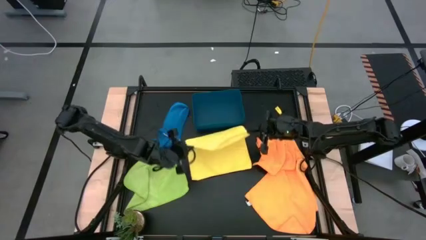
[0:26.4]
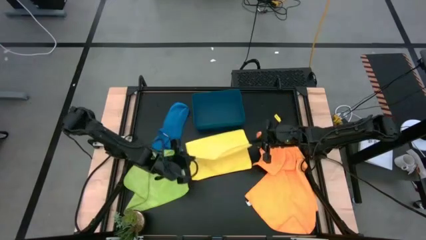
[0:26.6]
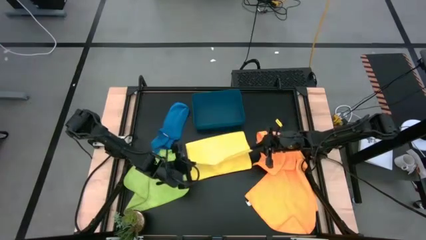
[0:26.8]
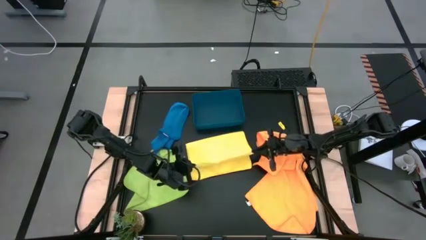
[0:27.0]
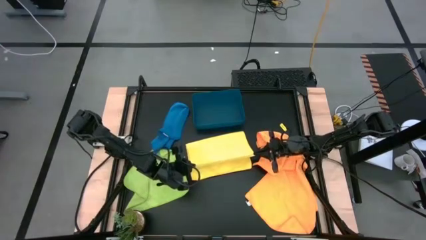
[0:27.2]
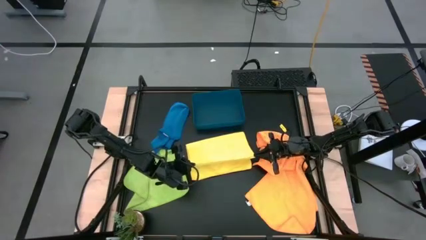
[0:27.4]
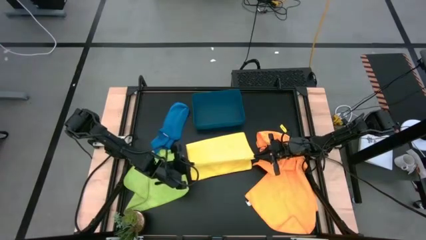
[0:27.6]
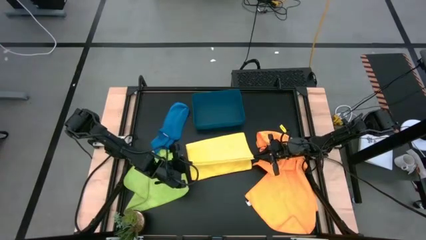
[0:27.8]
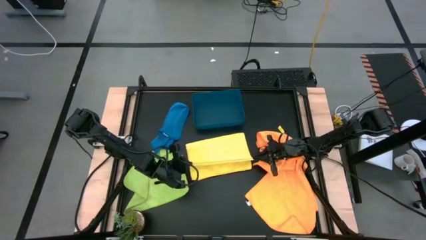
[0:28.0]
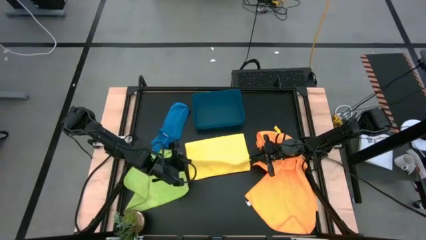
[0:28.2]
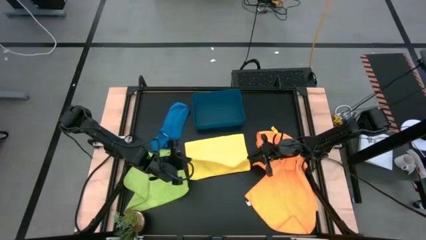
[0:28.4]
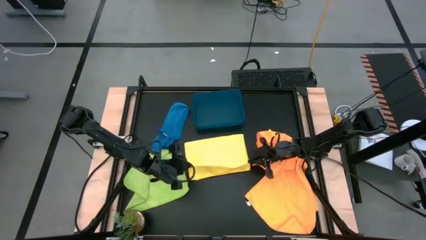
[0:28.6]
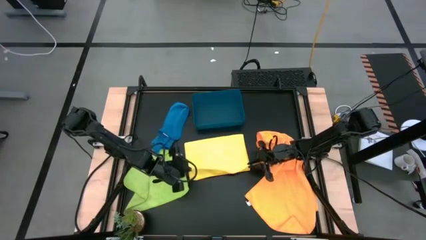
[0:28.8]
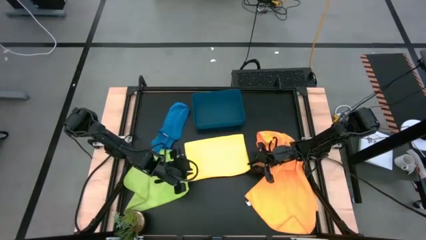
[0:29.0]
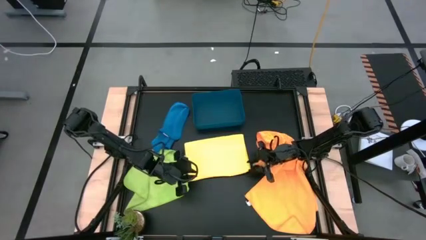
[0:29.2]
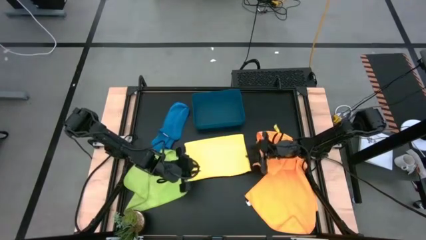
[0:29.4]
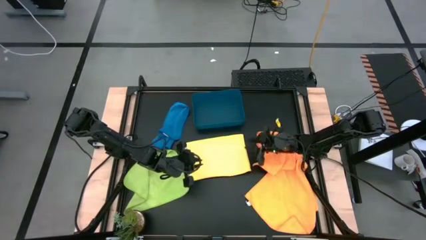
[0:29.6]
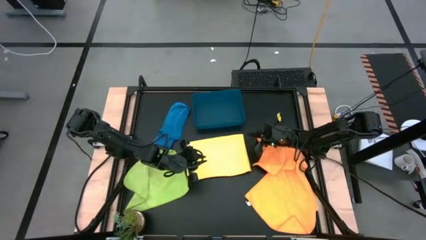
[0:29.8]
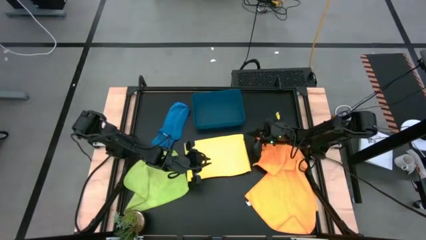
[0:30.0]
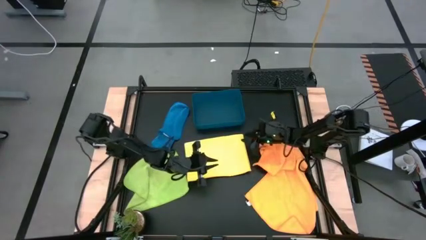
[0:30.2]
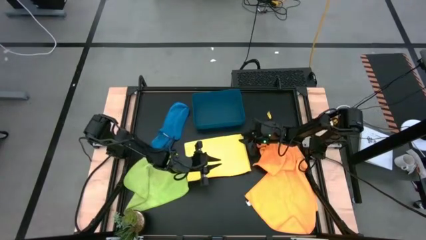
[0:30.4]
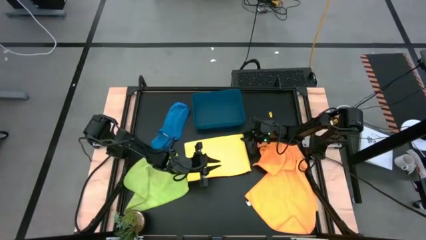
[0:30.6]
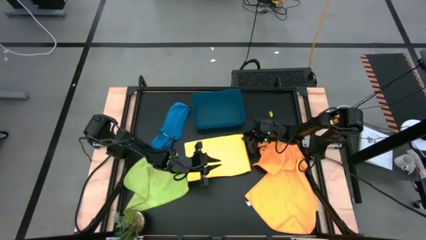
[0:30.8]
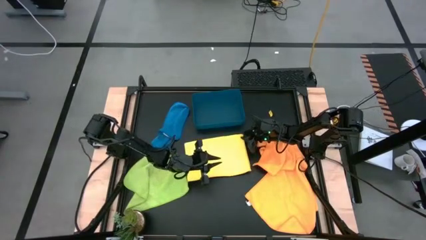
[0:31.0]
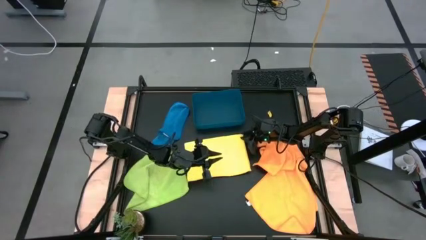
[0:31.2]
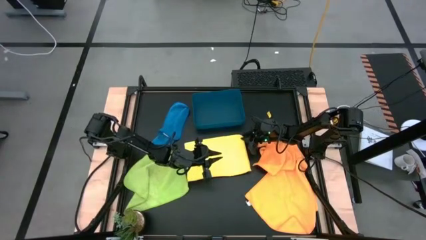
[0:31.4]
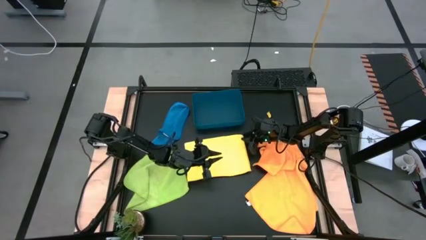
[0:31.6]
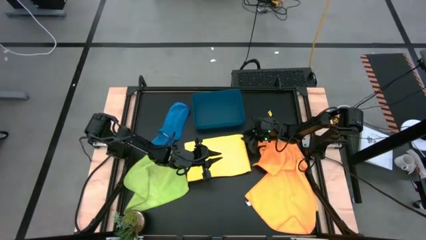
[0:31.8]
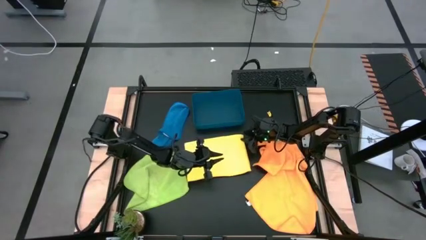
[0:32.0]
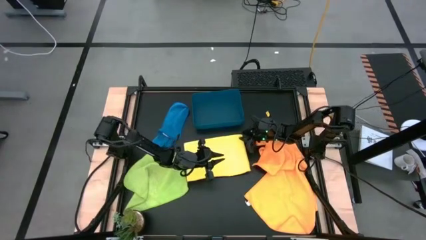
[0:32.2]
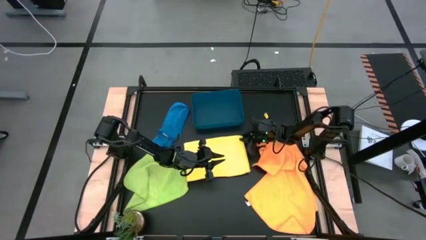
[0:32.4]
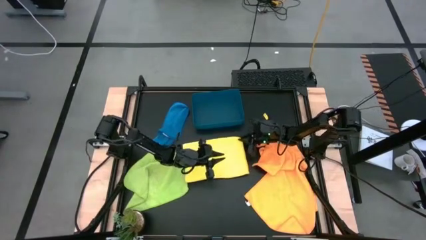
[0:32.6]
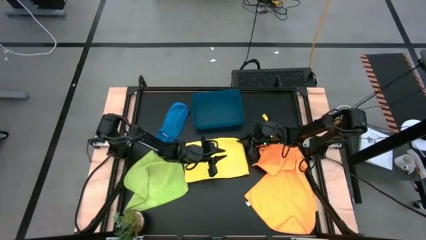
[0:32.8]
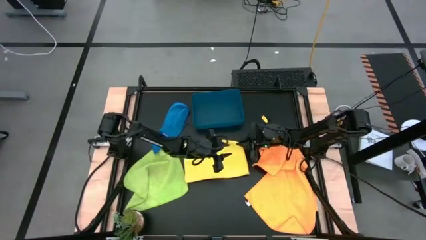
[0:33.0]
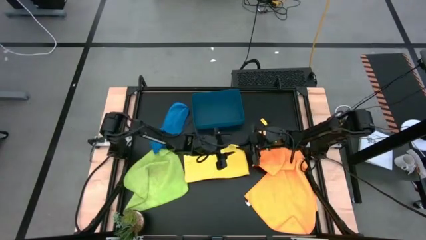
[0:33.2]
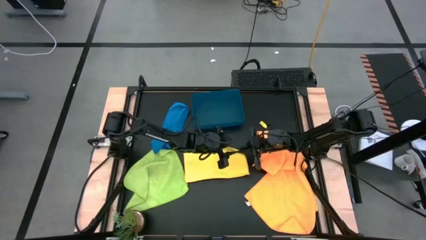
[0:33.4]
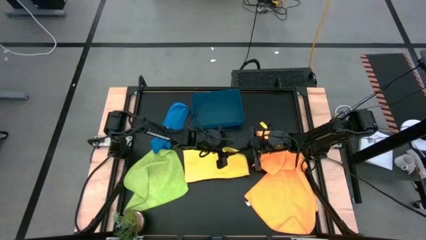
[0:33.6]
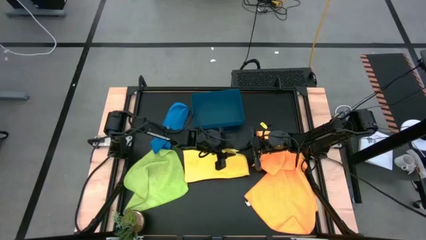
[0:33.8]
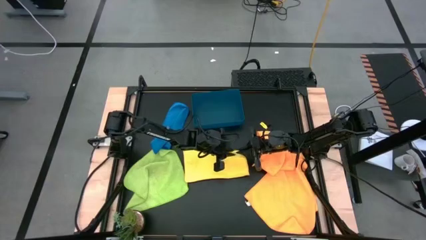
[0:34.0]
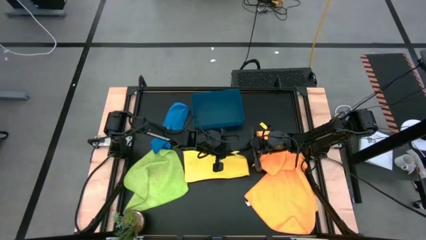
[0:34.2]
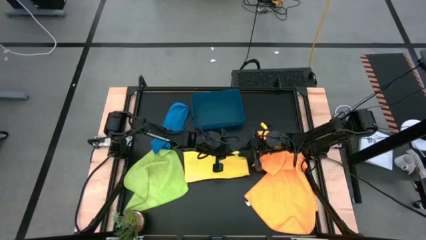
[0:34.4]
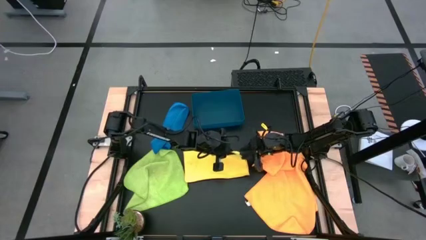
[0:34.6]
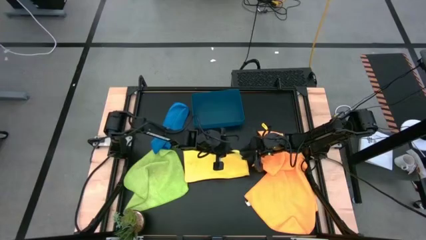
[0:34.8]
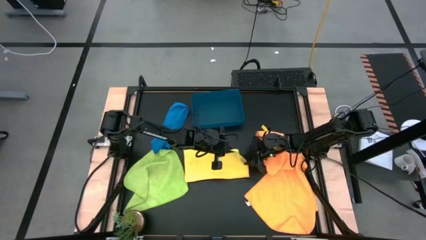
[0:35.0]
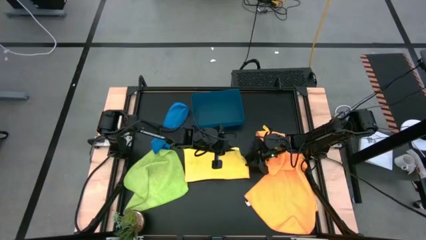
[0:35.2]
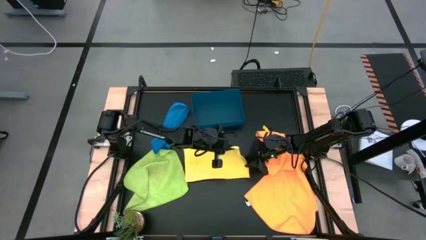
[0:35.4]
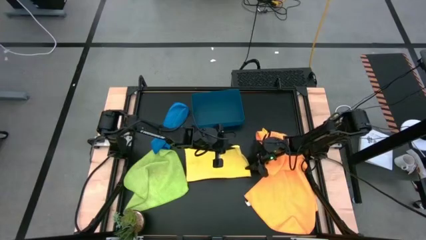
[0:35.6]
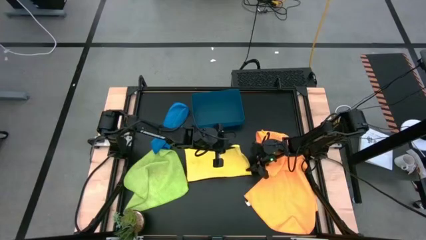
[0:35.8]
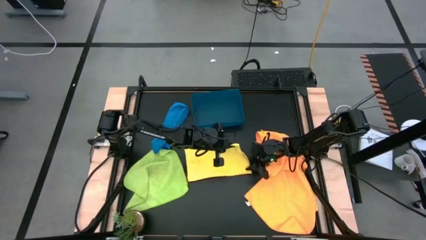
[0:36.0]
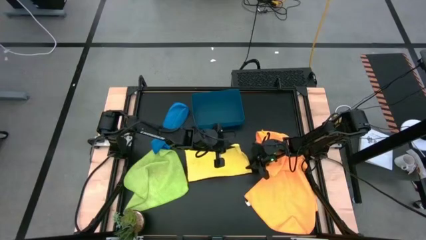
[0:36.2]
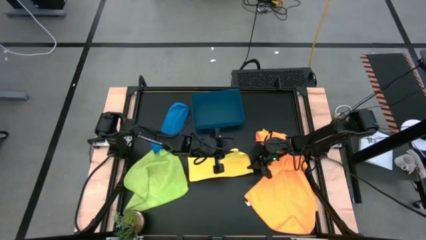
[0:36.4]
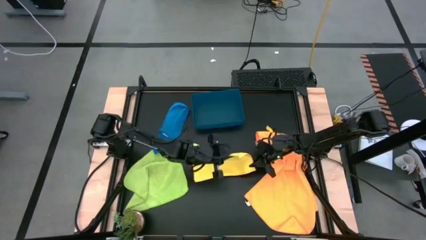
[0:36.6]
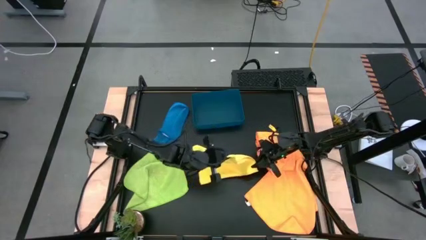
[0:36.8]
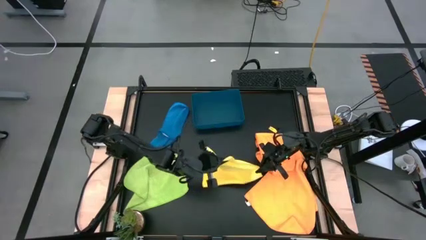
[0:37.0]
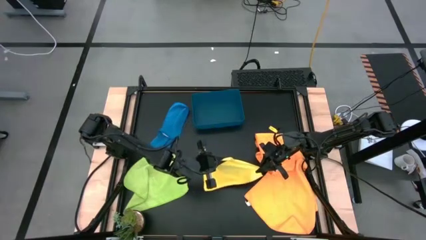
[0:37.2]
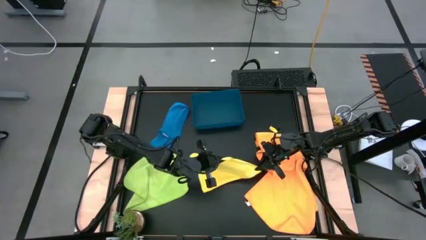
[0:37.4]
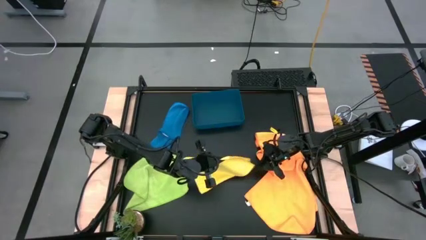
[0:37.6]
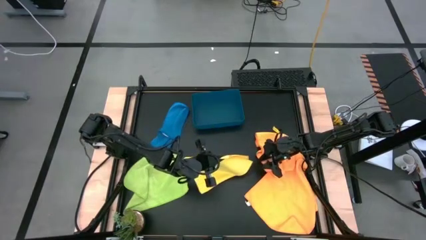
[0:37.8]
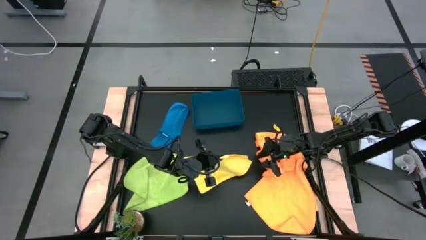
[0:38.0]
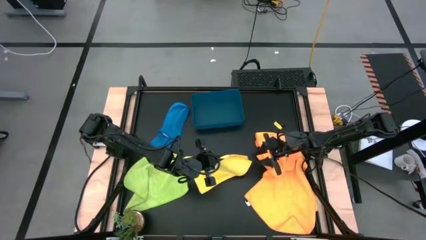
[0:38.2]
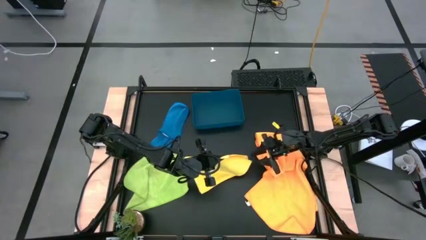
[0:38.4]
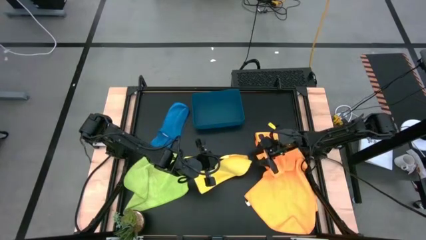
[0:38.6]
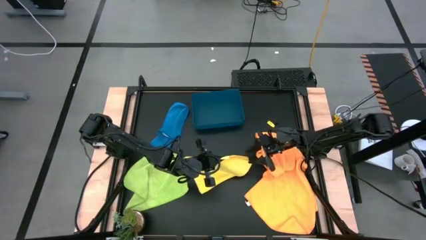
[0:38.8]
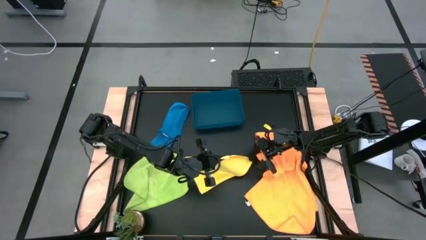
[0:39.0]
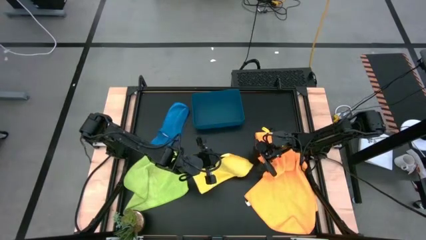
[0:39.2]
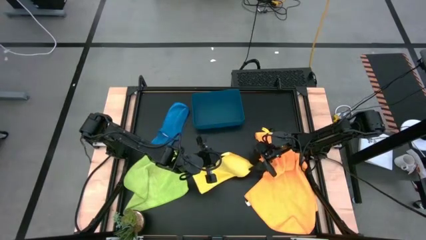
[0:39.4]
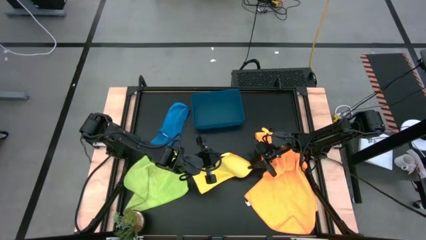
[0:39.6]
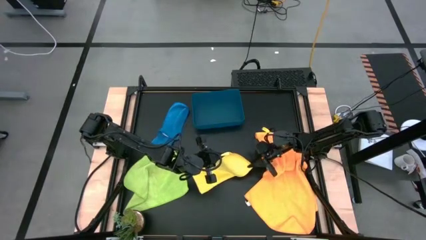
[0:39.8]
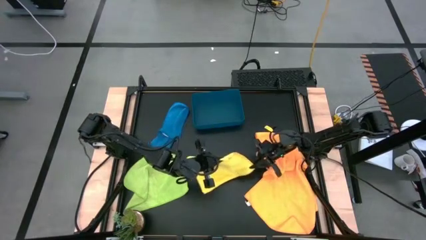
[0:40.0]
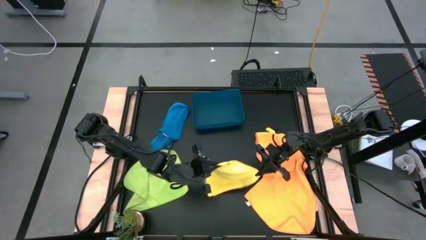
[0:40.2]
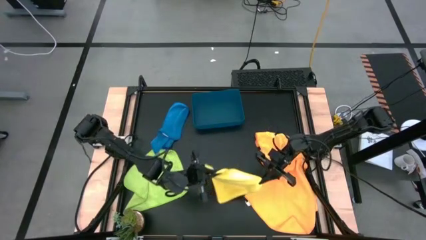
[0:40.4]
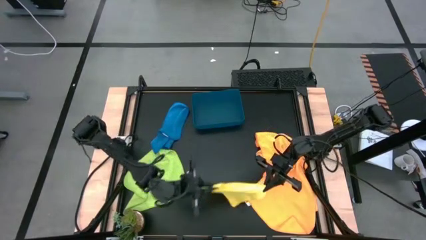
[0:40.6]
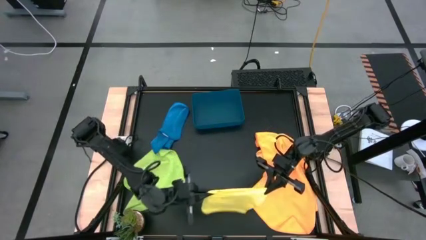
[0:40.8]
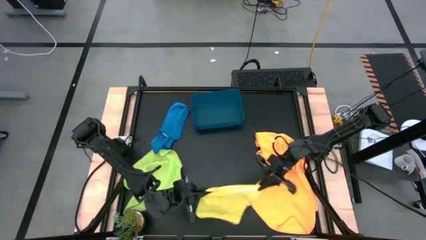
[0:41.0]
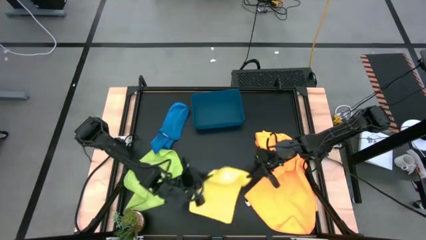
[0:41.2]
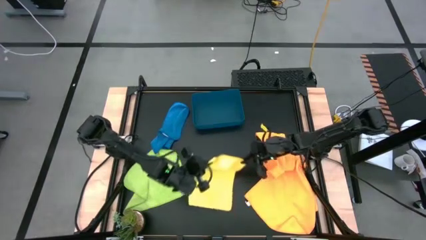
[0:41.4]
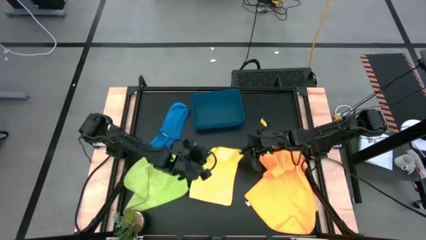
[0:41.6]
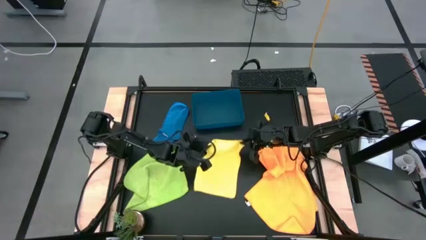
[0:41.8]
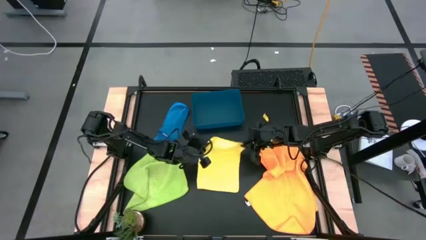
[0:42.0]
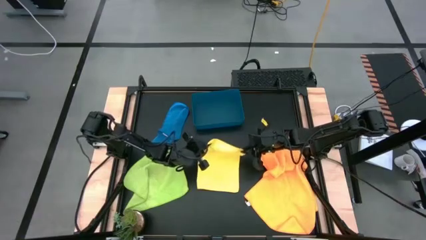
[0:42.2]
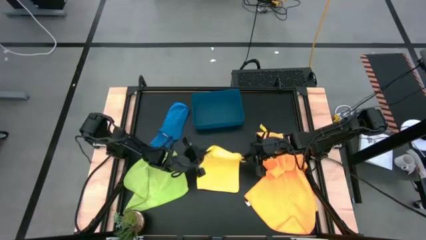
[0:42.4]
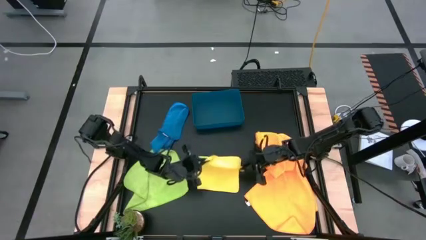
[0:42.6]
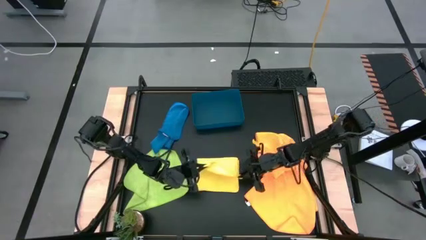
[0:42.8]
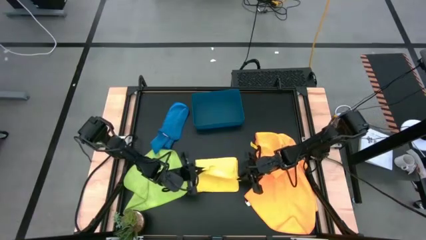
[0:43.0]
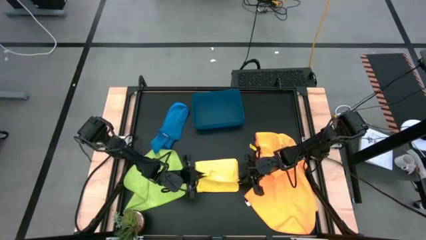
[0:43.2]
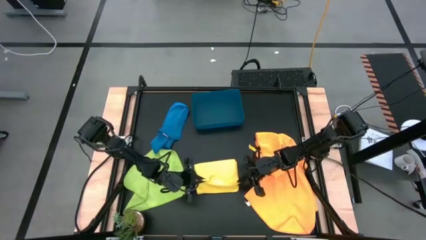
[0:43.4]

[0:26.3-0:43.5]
Task: Fold microfiber towels
Fold the yellow microfiber cloth
